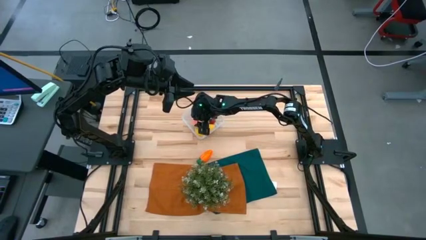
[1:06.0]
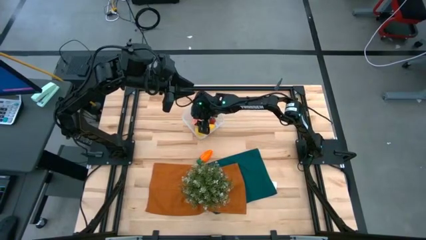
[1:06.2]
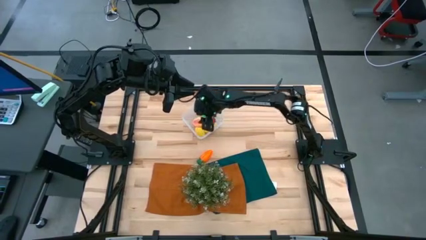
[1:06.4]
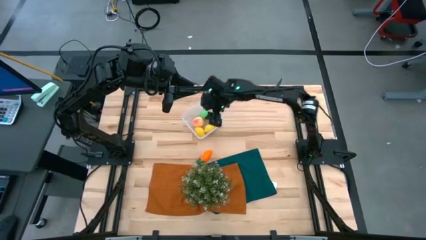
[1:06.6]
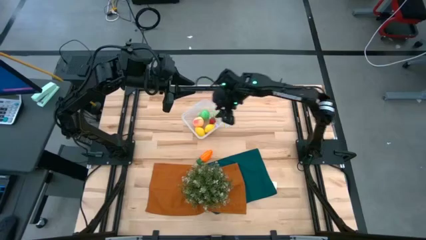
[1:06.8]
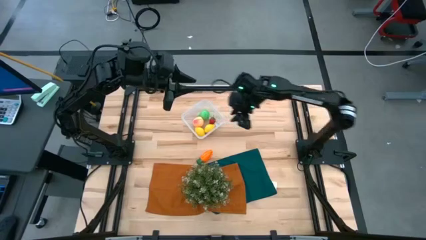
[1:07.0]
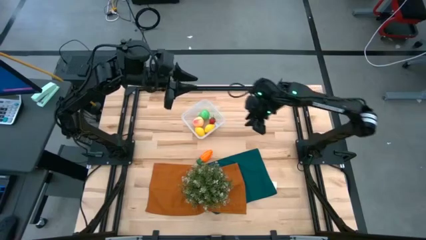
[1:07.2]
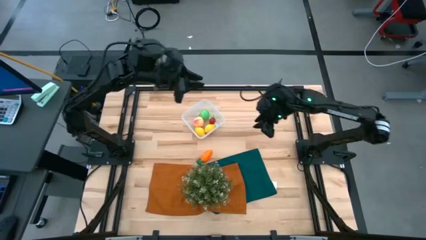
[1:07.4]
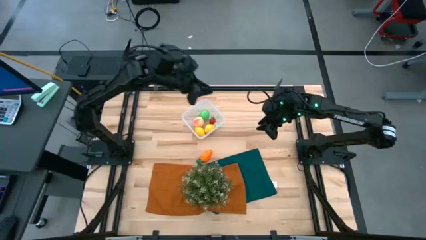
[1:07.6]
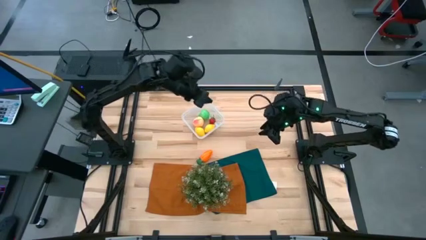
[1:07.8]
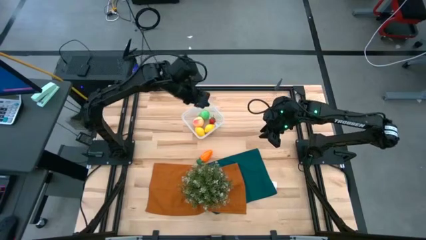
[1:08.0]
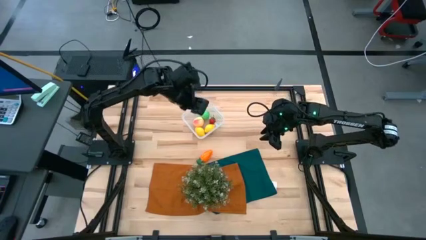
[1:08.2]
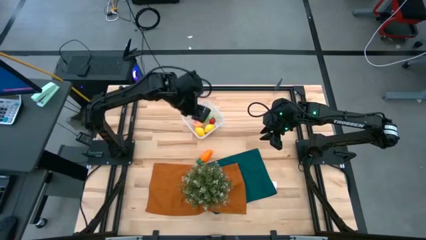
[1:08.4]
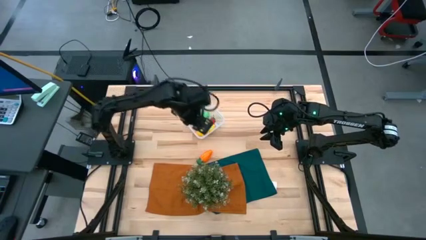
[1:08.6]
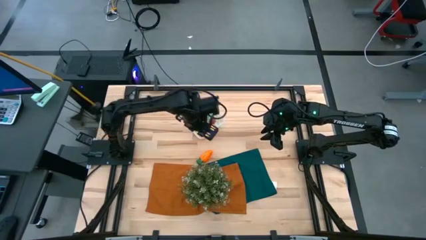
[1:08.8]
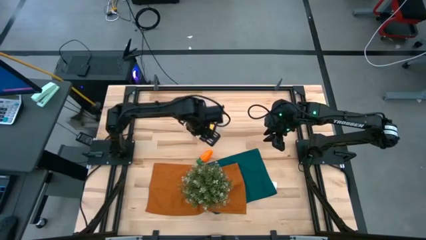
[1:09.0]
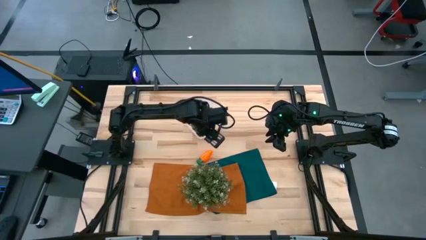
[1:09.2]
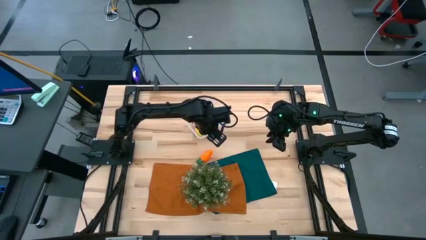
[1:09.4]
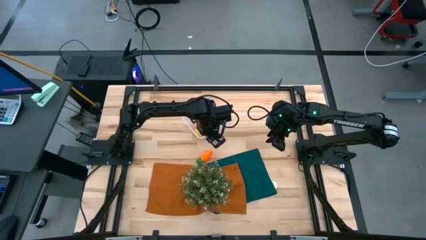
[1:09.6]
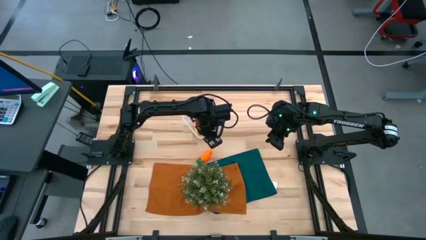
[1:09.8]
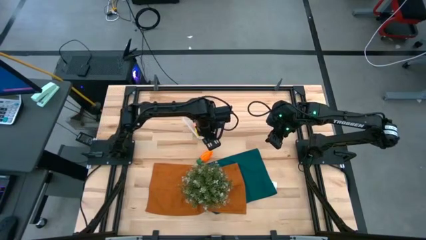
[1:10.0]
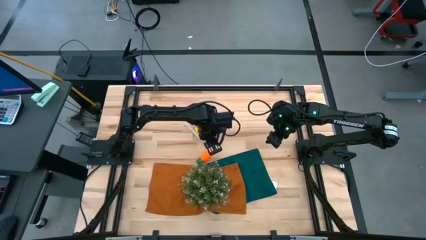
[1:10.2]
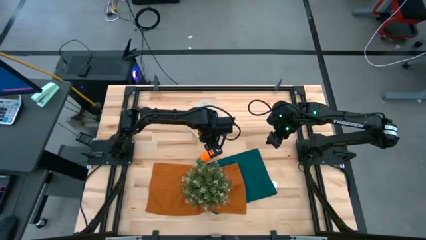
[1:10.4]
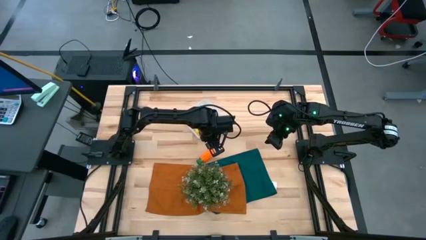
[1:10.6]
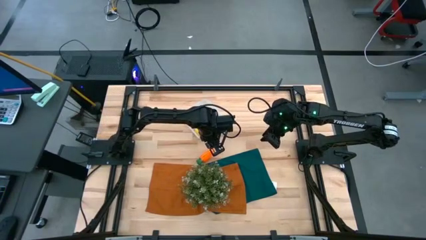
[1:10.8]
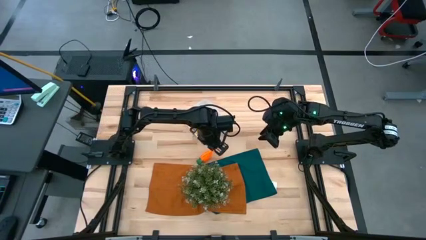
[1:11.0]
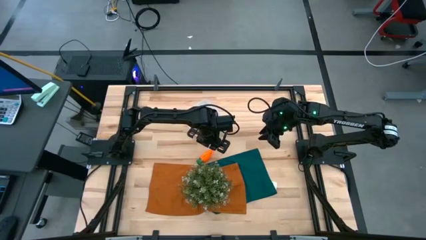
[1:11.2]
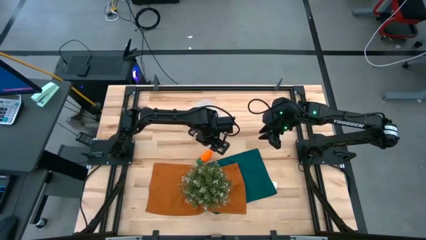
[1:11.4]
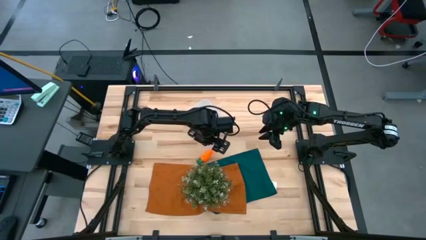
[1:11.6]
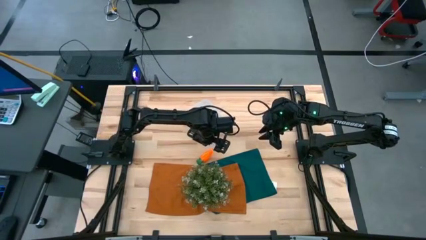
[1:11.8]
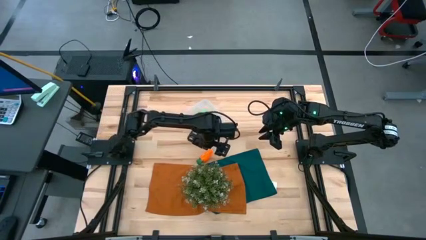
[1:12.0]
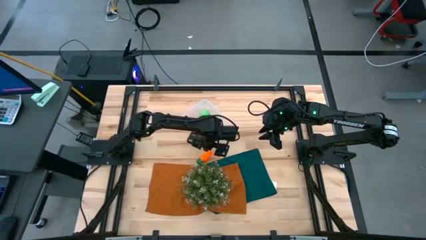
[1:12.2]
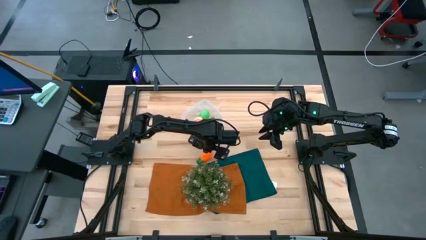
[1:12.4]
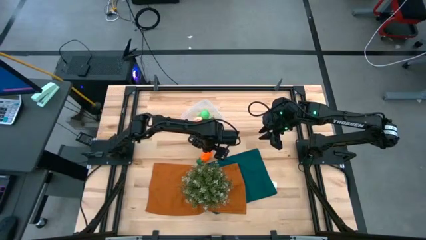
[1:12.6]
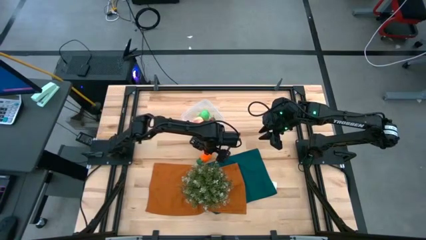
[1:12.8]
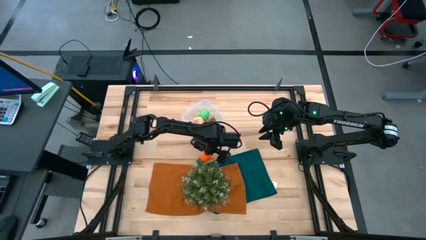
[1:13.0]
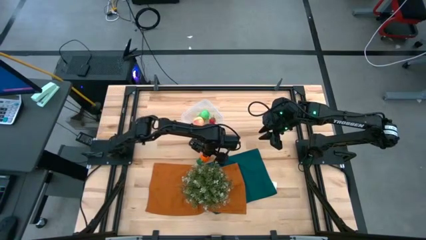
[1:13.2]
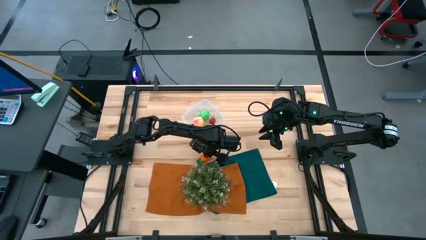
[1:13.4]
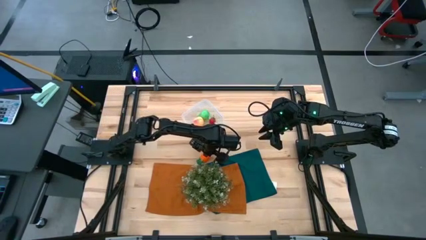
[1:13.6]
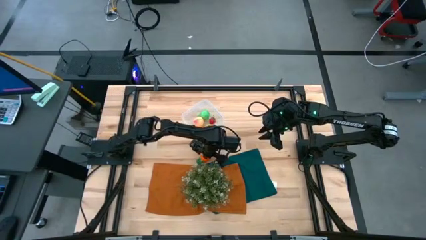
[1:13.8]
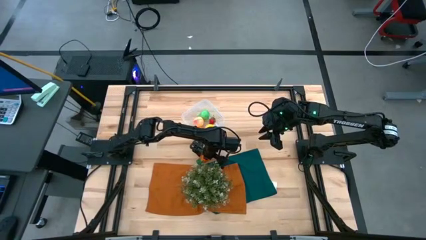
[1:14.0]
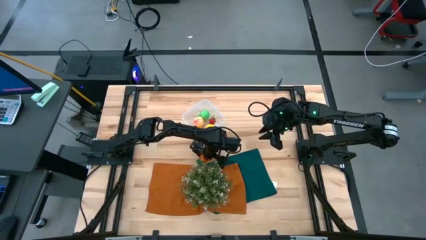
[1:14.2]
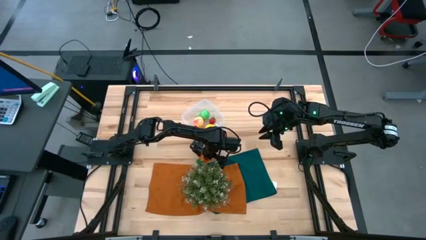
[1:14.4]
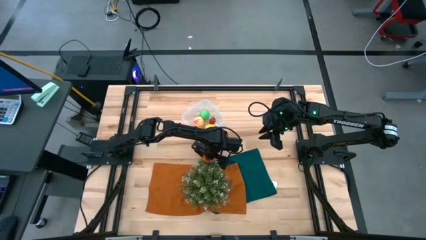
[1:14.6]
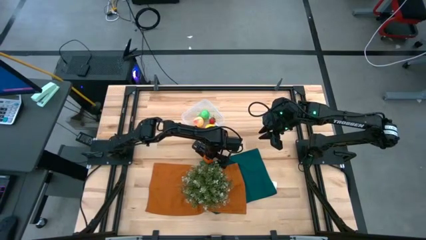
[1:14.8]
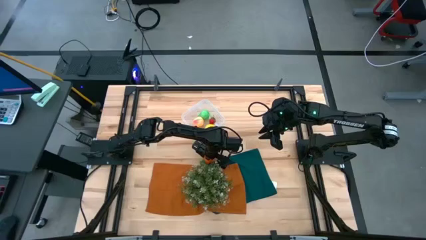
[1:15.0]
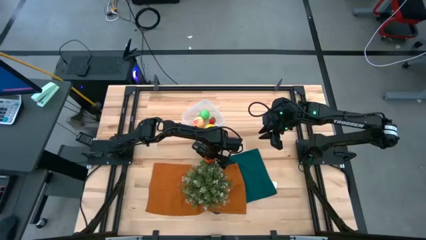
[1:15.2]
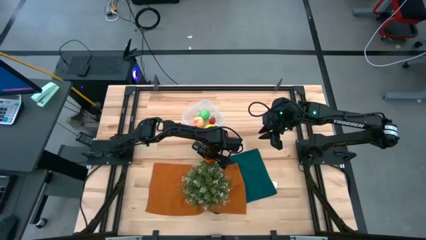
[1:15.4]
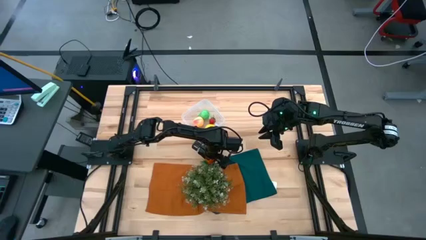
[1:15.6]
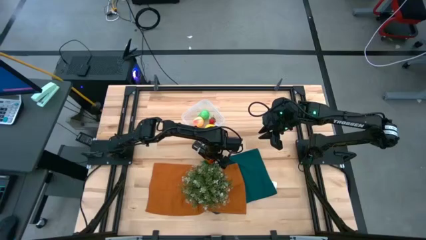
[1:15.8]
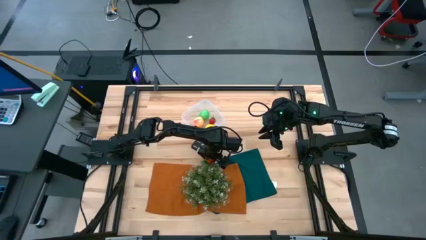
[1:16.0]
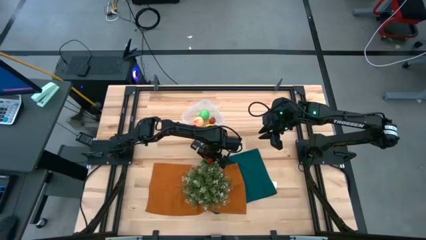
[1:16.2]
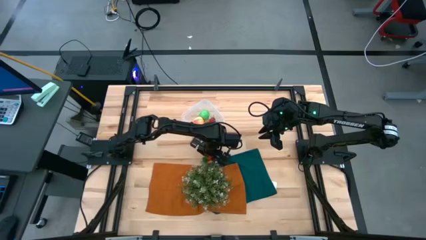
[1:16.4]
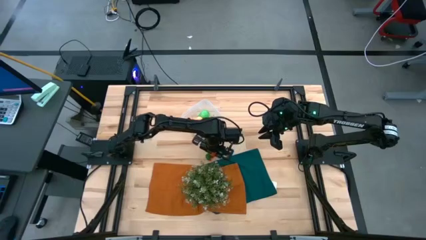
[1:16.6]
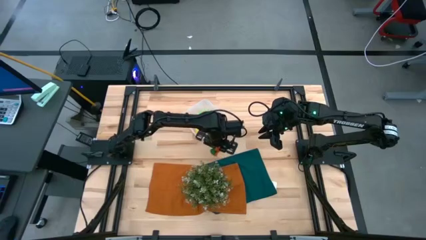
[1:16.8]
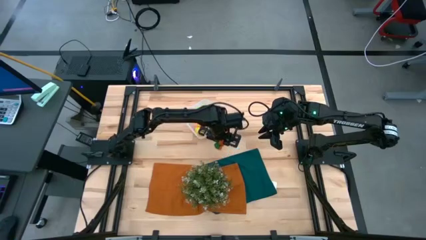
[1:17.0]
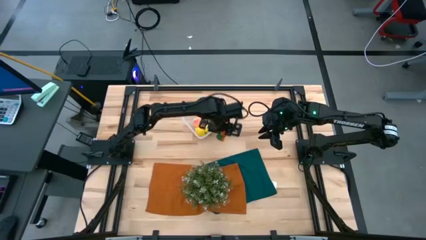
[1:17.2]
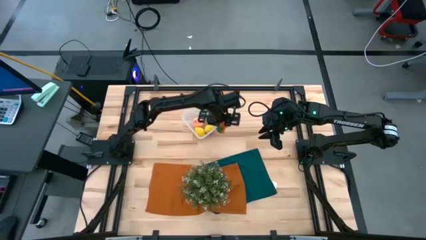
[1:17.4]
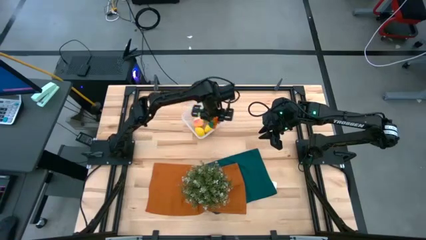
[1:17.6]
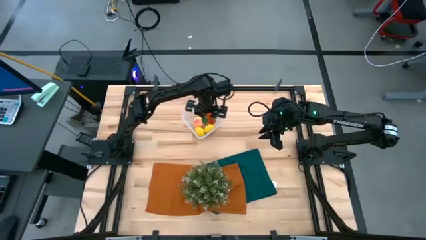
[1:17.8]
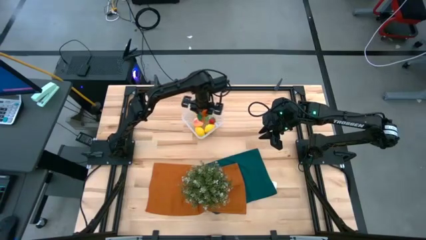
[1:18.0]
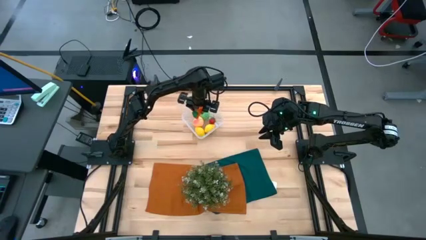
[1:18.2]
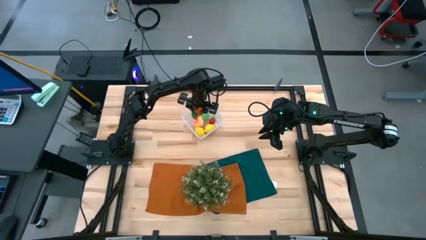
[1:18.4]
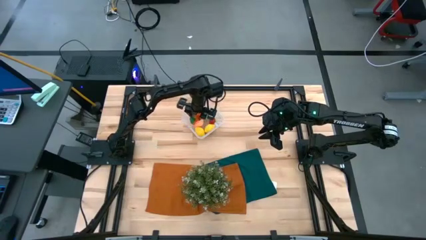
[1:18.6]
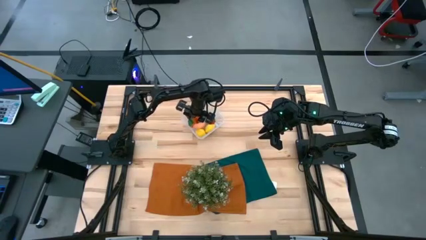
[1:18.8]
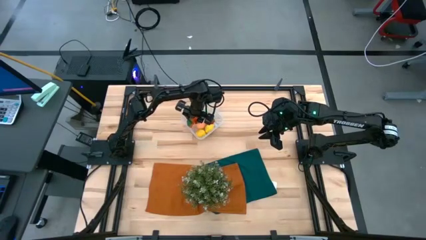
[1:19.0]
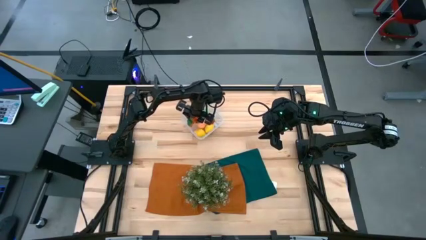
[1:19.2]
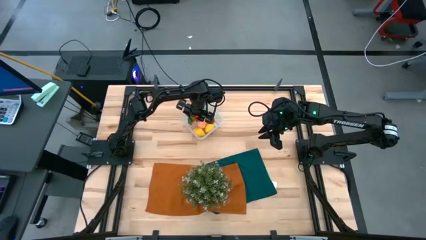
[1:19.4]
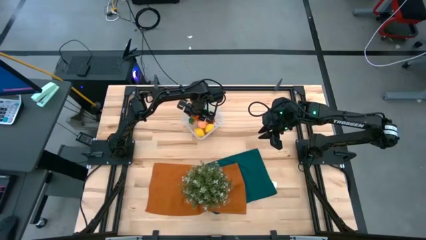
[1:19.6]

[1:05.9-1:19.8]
Task: Pick and placing Produce into tupperware
Put the carrot into the transparent container
